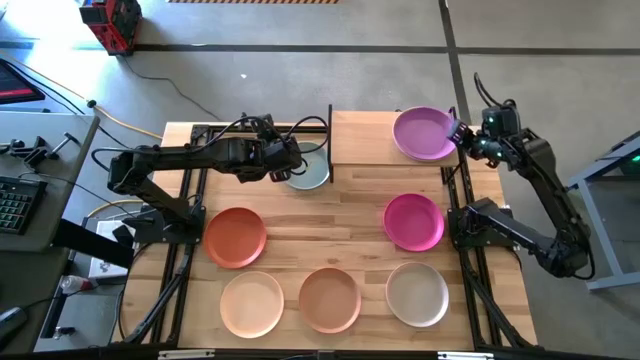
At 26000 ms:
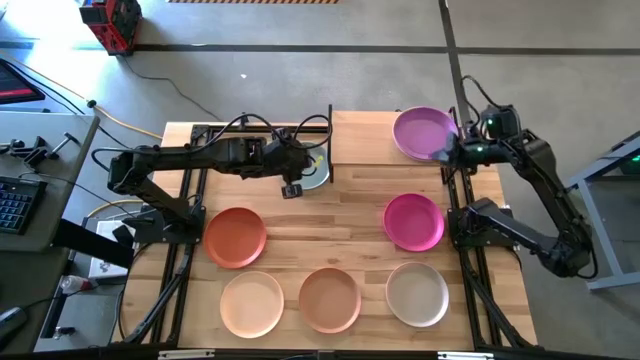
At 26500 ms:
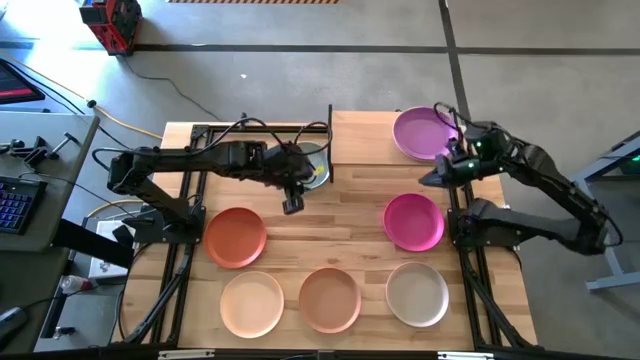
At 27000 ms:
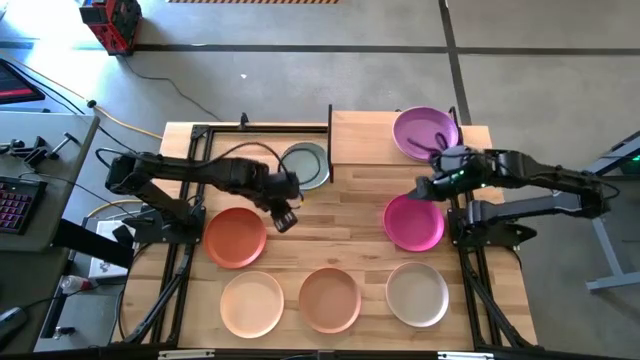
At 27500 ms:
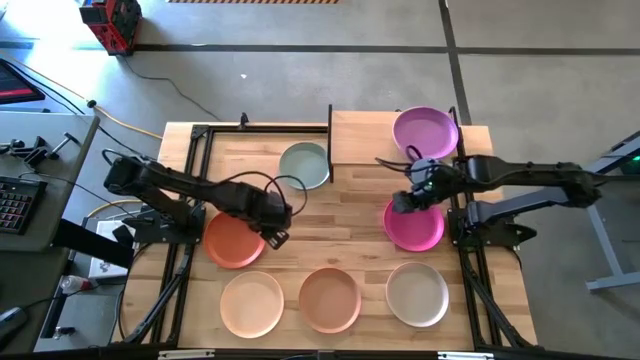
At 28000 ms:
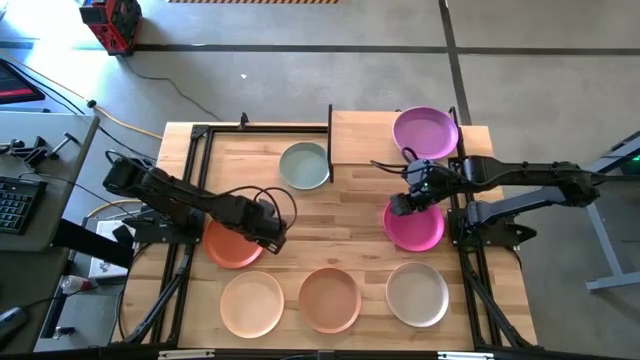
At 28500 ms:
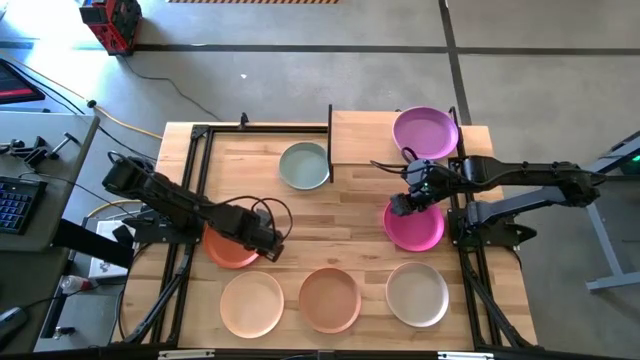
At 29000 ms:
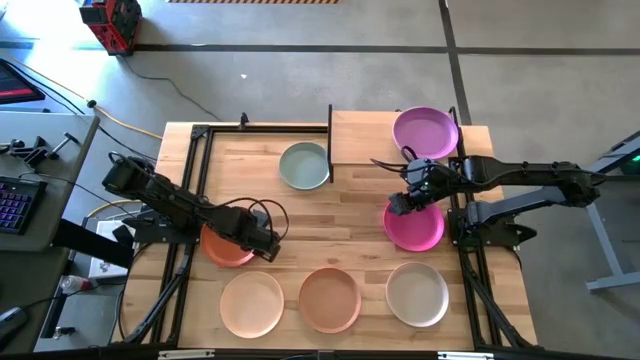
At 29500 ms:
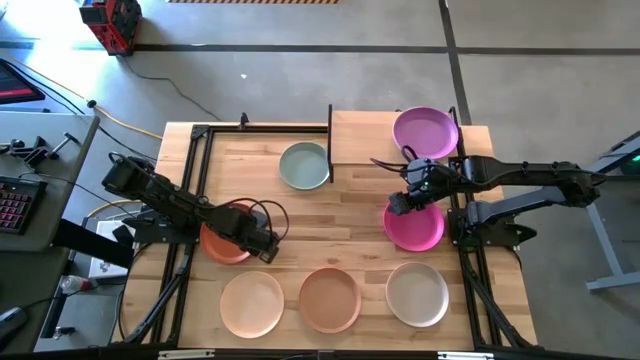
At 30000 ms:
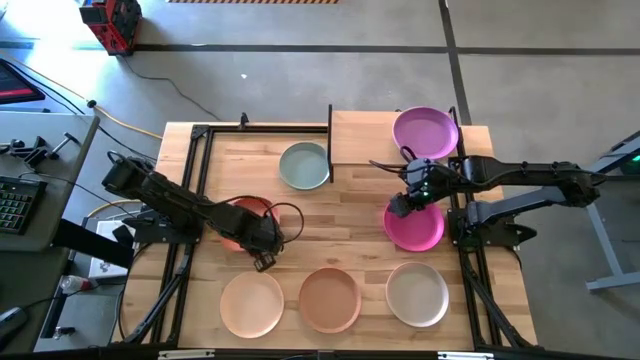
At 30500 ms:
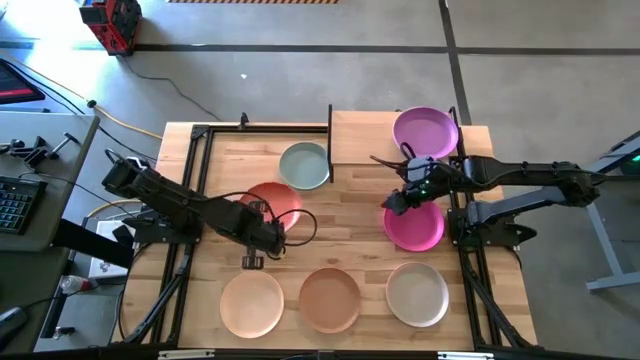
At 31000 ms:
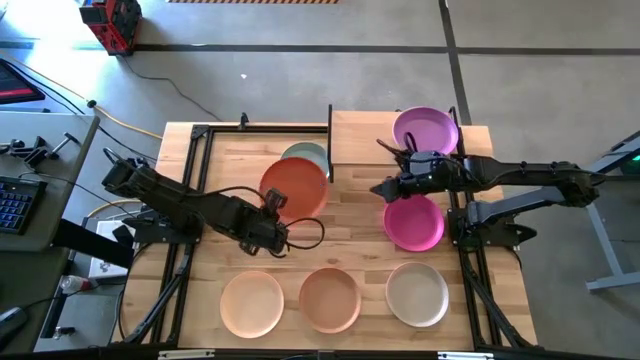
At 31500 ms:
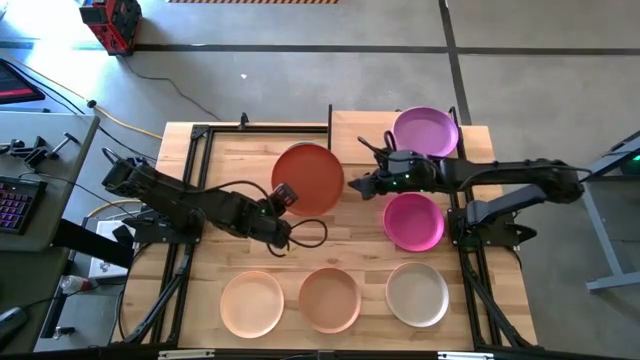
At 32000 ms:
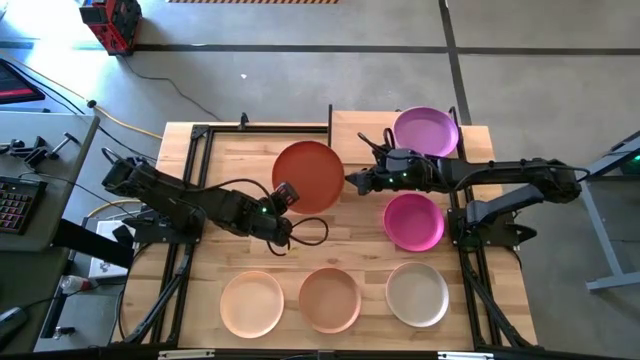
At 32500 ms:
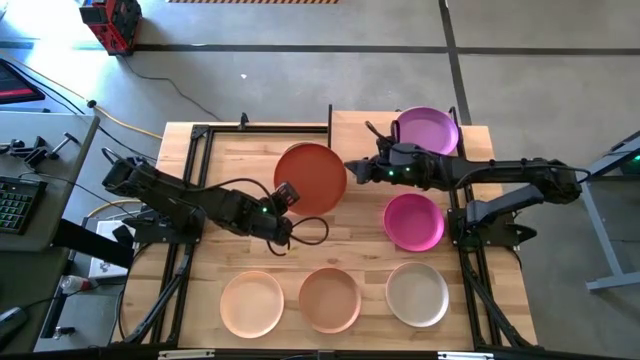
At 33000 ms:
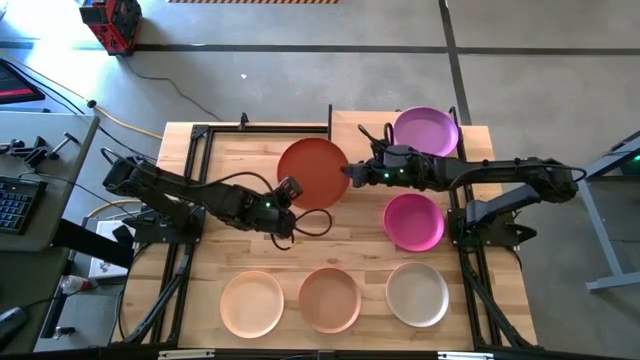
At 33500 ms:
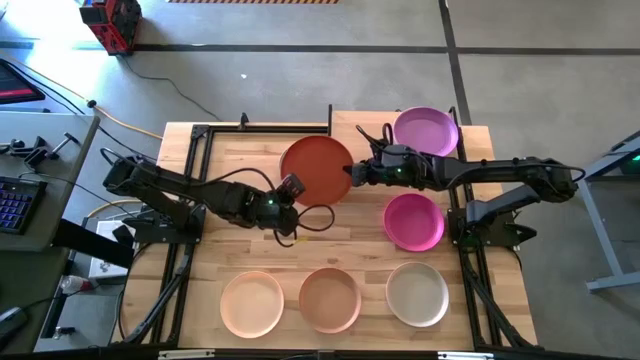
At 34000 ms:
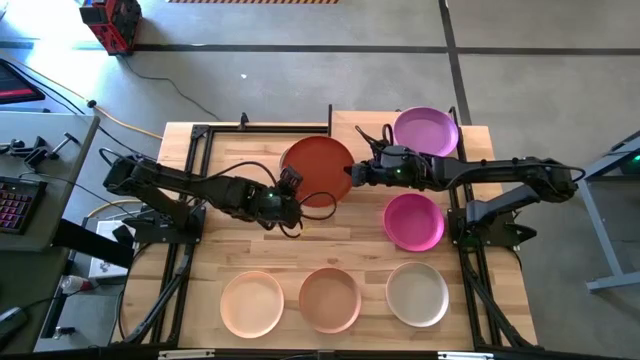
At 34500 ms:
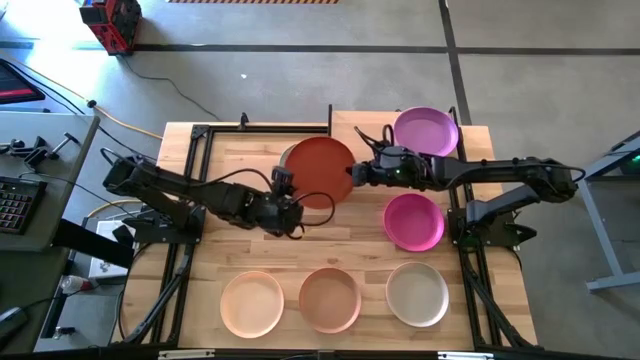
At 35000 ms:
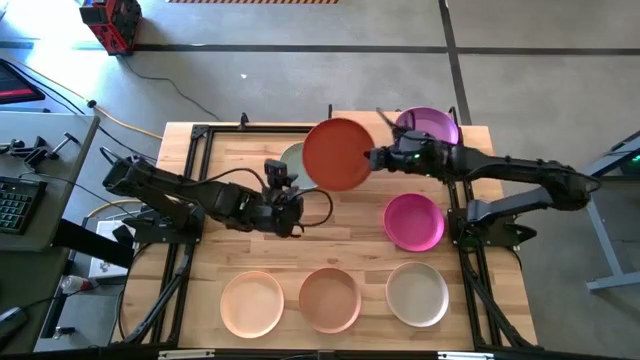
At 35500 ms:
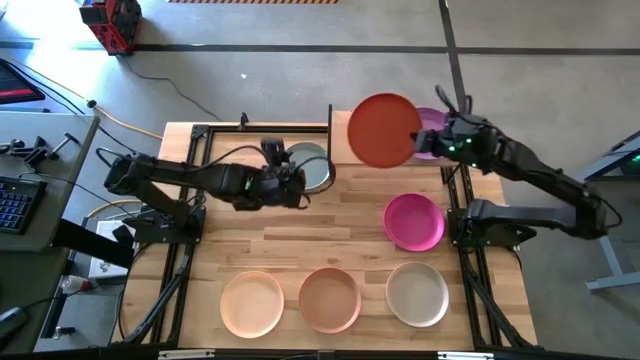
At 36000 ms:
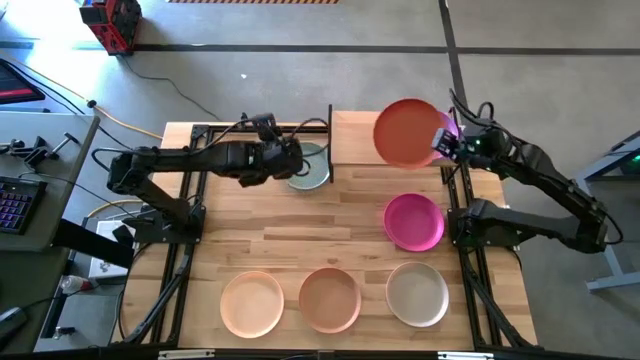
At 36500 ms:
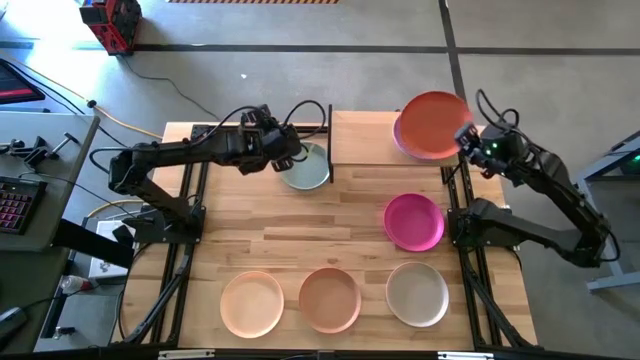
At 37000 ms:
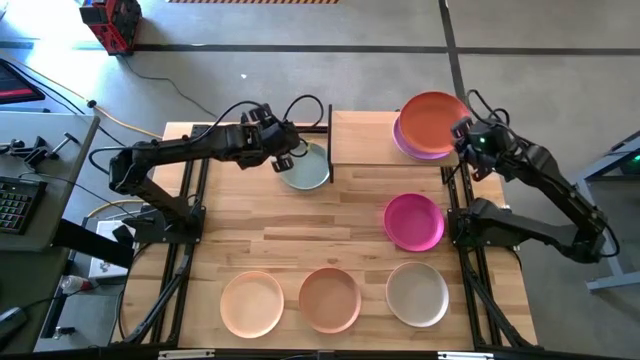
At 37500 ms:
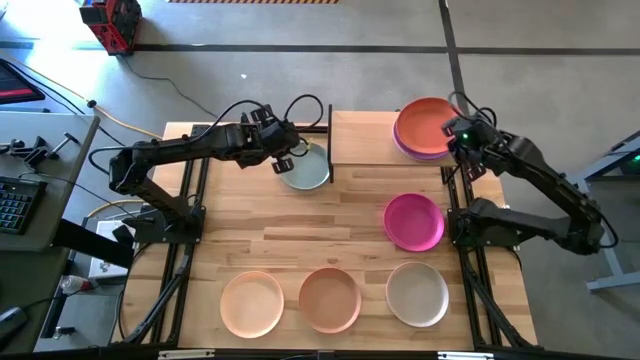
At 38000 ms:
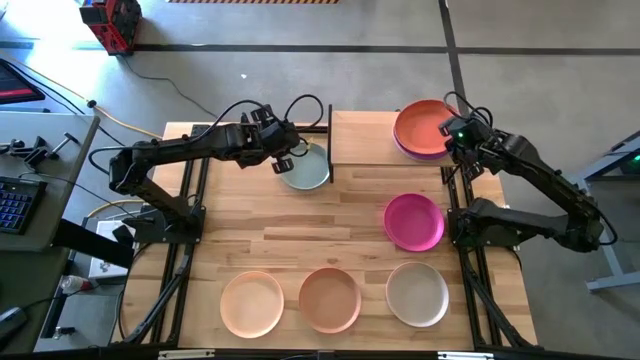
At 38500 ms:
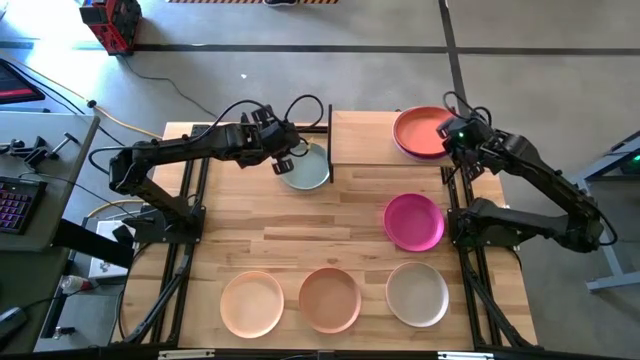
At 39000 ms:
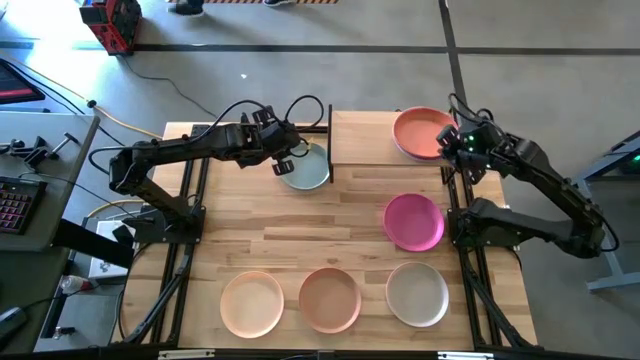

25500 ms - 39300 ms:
Task: Place and stack plates onto a shelf
Stack the orange plate on the purple plate on the shelf

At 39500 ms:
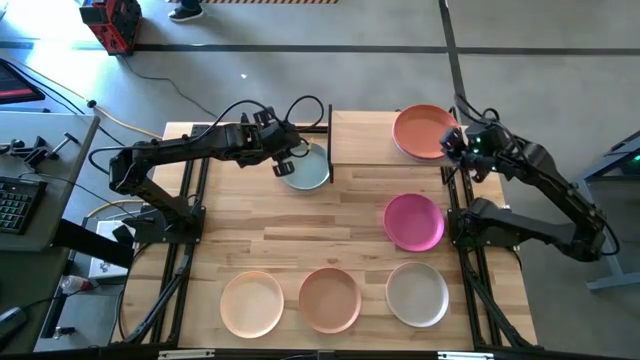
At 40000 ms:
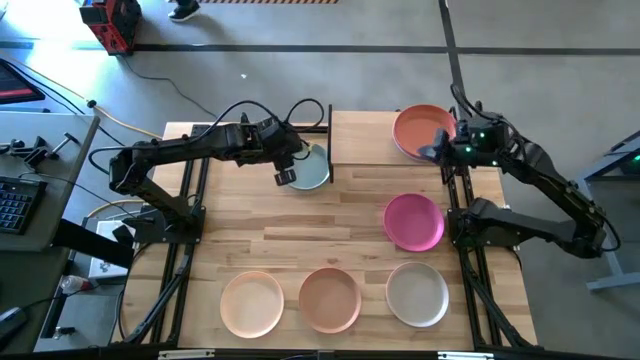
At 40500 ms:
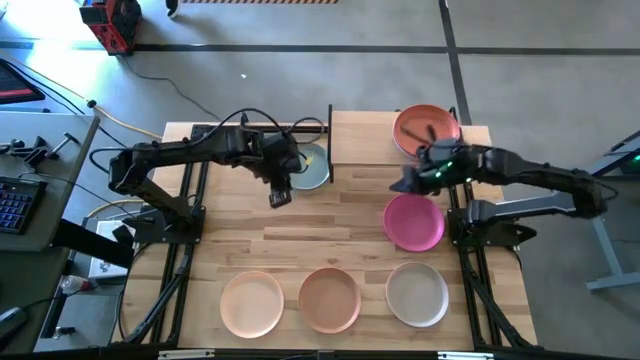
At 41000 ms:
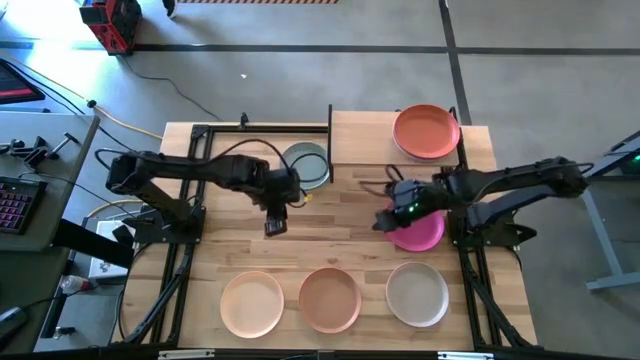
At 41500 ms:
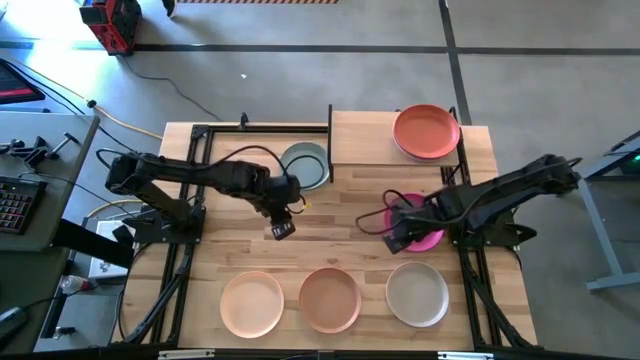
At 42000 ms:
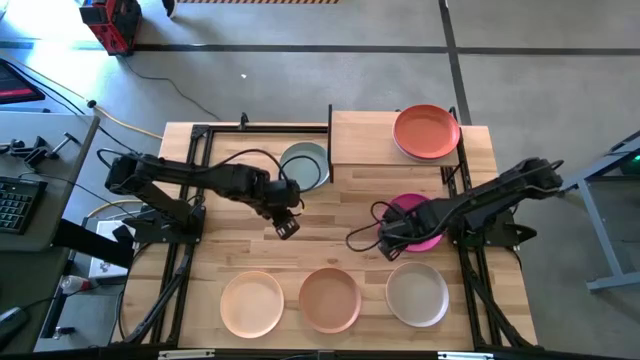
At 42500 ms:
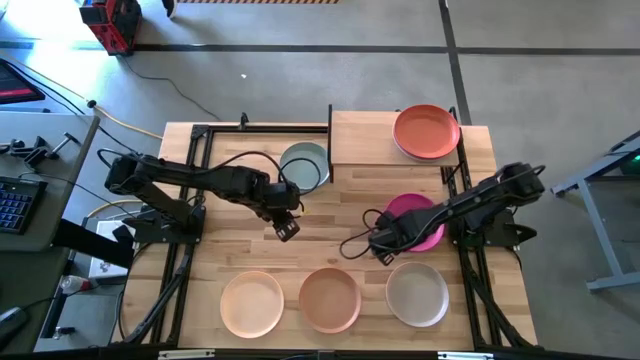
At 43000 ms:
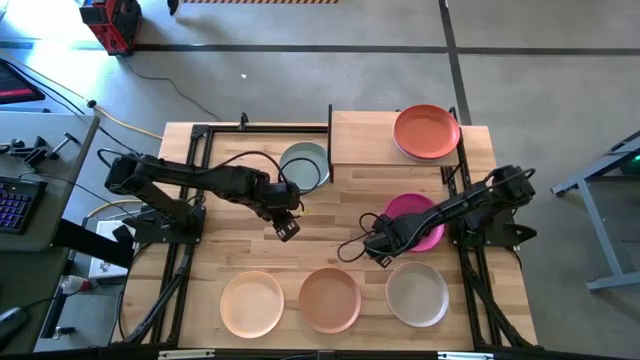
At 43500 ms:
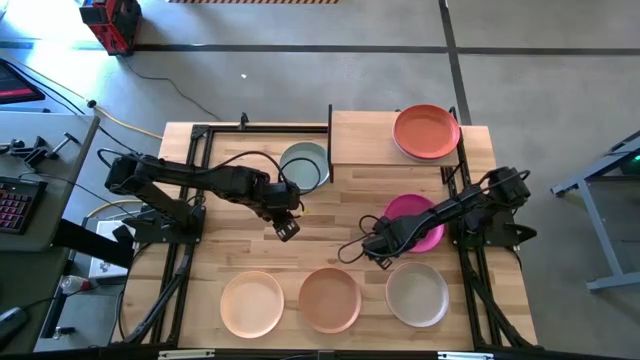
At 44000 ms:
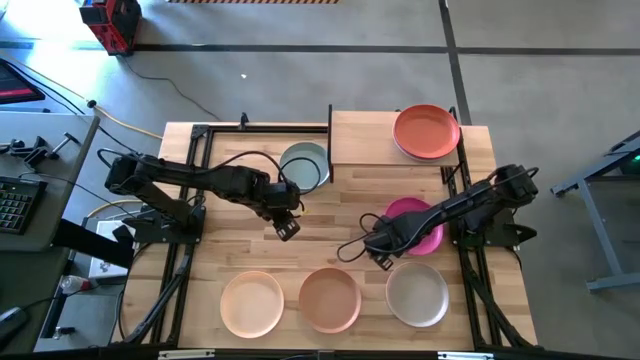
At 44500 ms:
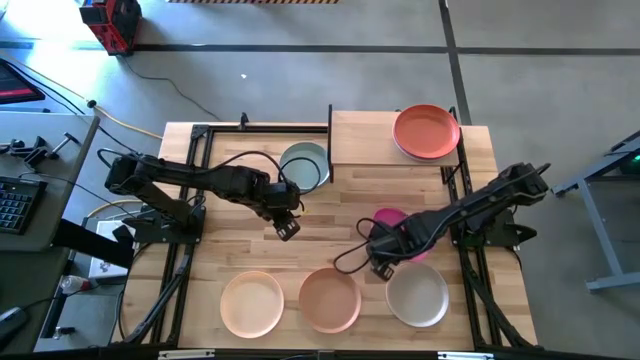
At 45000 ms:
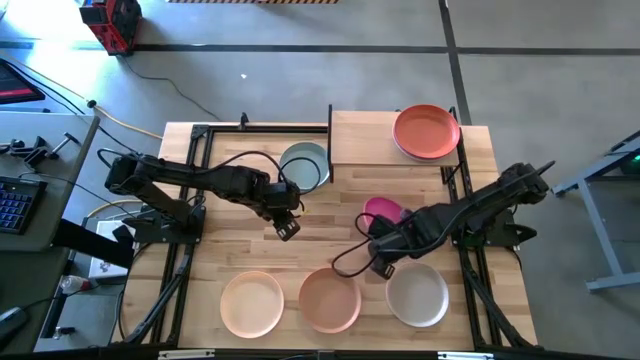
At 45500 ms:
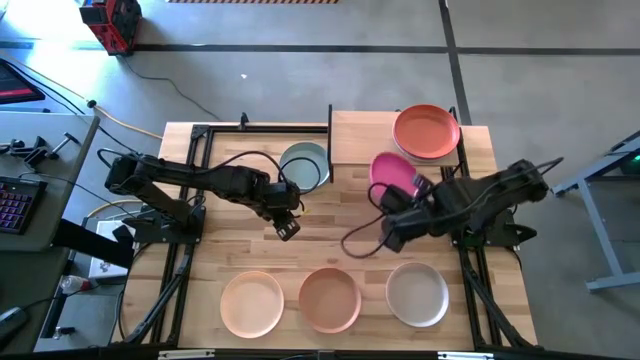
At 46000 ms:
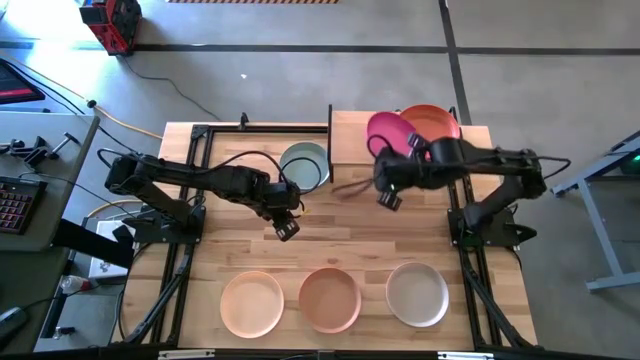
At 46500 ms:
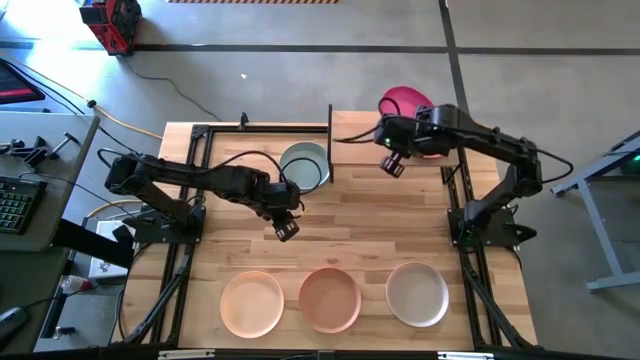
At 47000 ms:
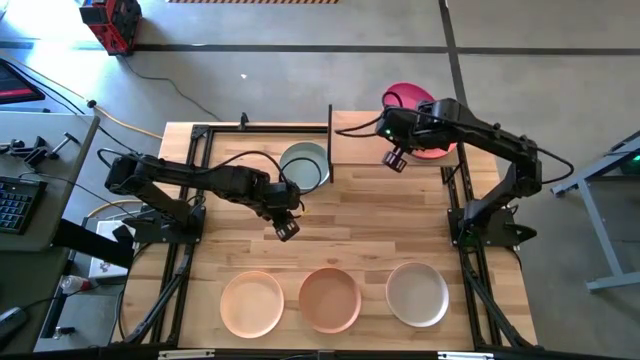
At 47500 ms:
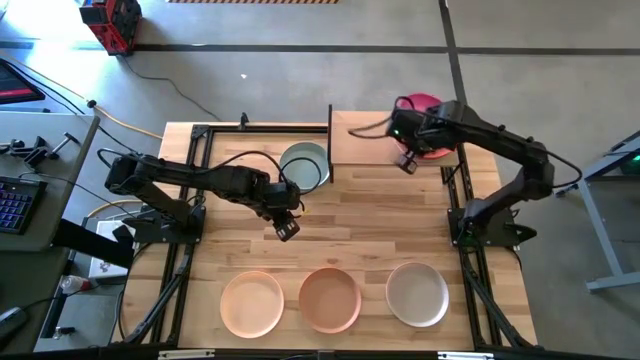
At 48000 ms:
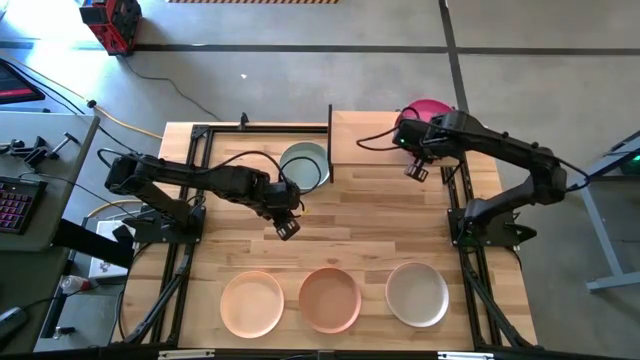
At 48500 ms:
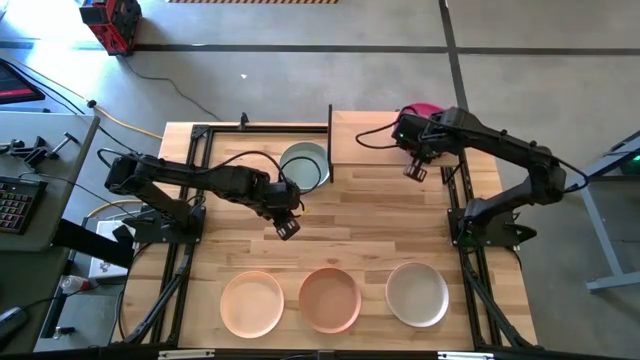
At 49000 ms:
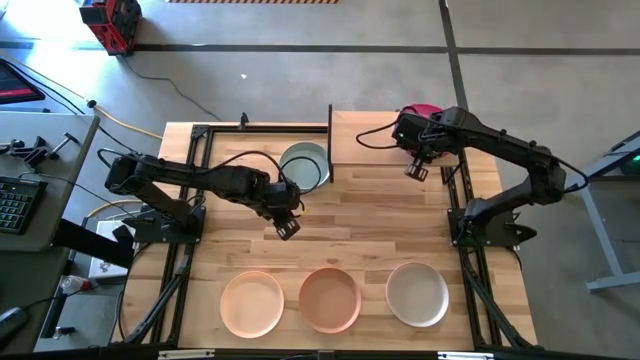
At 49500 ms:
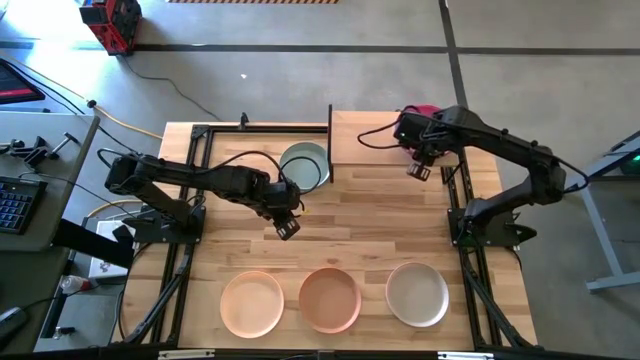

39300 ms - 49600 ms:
Stack the pink plate on the orange plate on the shelf
